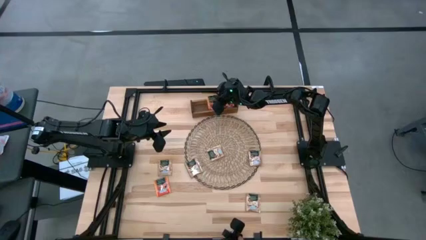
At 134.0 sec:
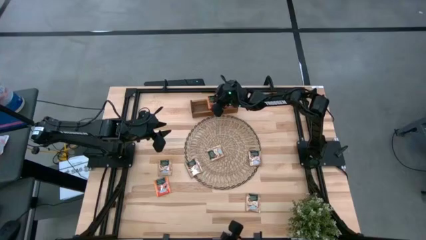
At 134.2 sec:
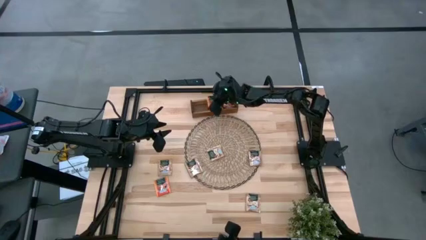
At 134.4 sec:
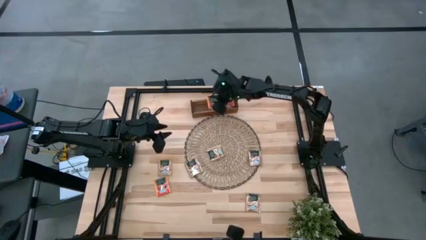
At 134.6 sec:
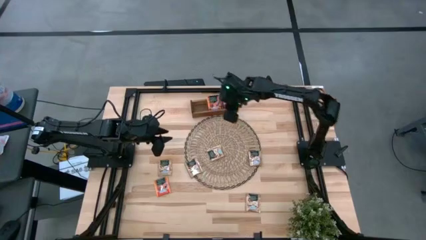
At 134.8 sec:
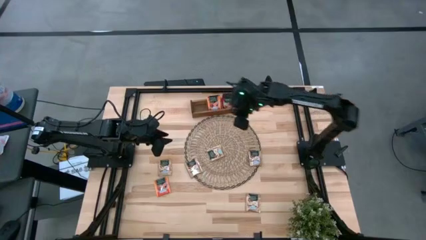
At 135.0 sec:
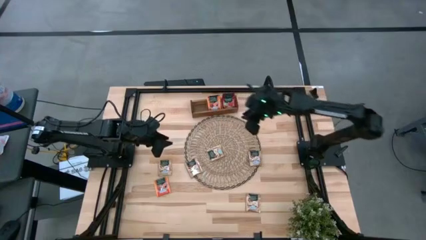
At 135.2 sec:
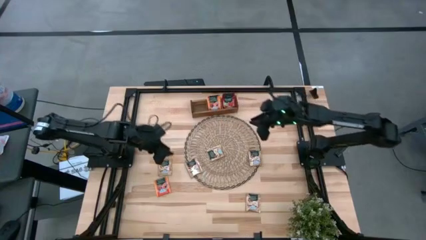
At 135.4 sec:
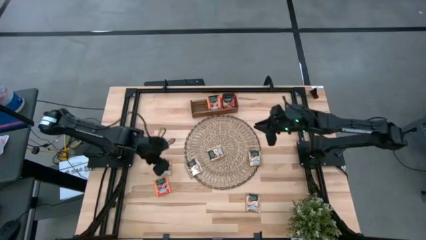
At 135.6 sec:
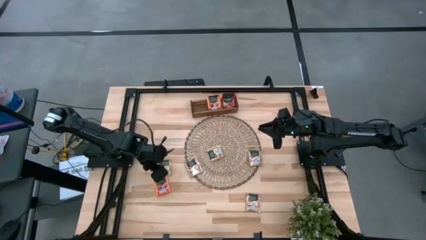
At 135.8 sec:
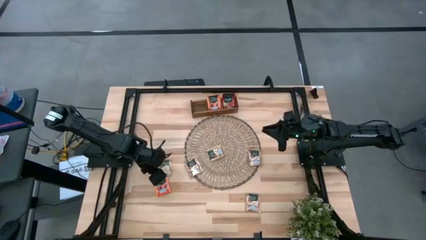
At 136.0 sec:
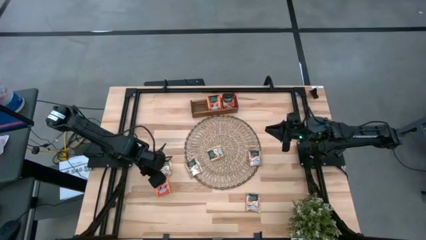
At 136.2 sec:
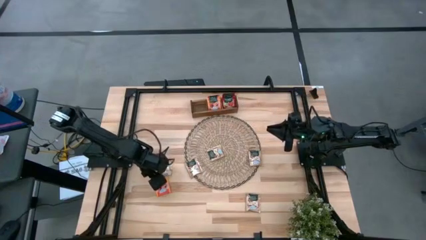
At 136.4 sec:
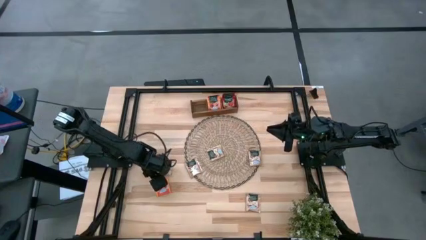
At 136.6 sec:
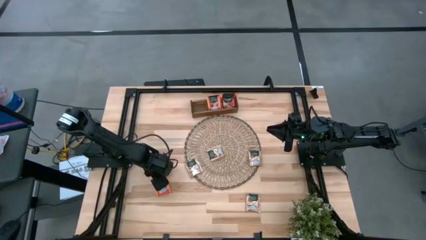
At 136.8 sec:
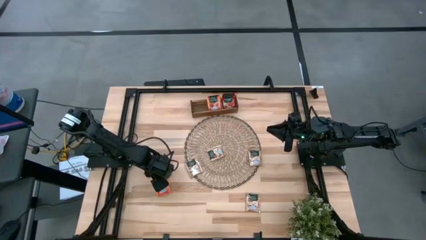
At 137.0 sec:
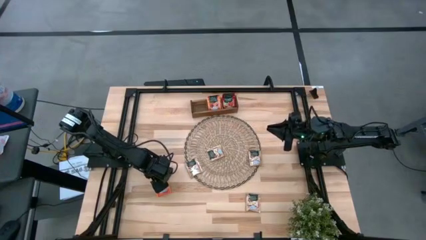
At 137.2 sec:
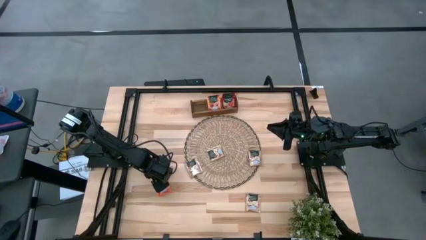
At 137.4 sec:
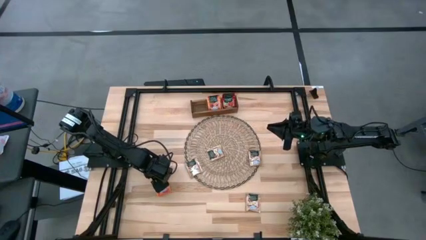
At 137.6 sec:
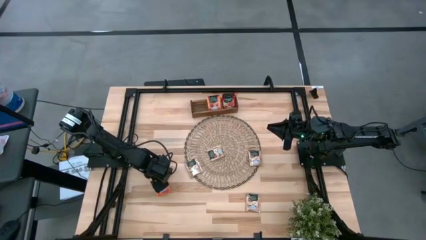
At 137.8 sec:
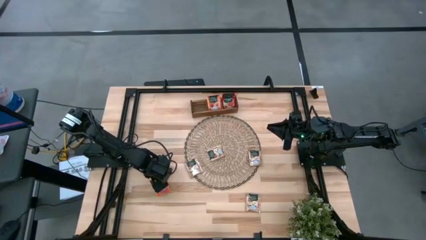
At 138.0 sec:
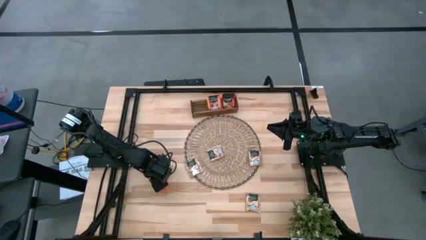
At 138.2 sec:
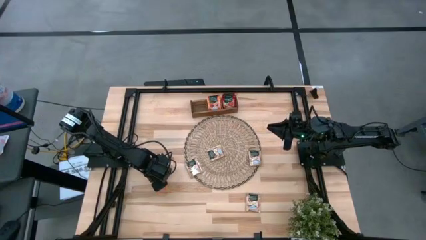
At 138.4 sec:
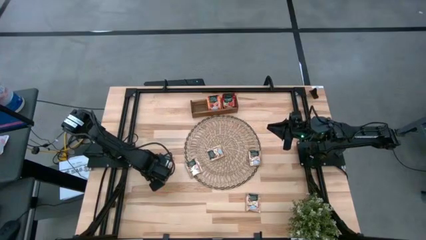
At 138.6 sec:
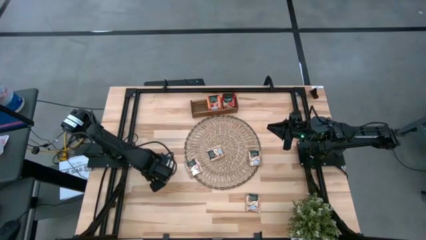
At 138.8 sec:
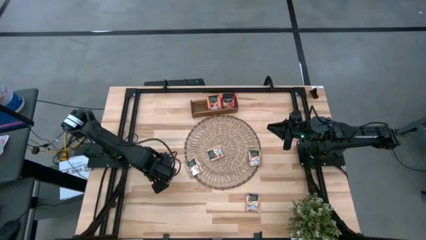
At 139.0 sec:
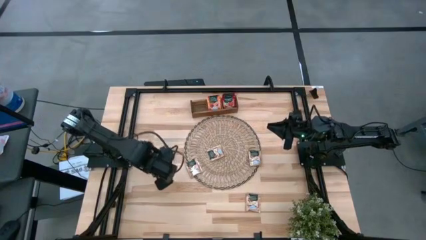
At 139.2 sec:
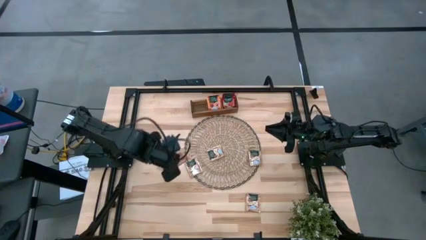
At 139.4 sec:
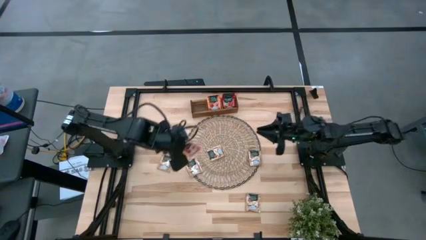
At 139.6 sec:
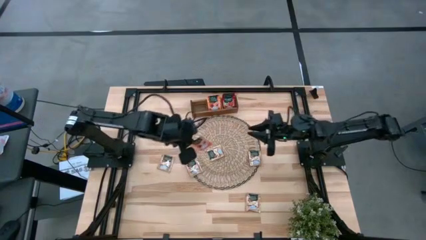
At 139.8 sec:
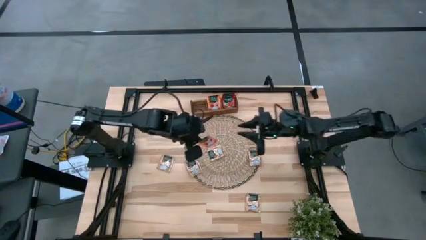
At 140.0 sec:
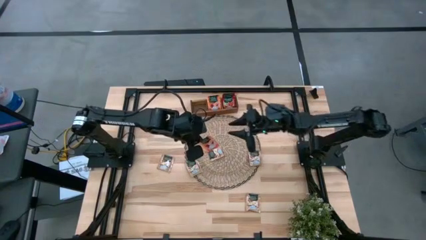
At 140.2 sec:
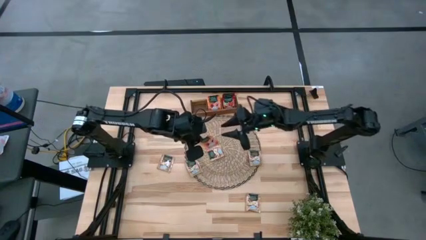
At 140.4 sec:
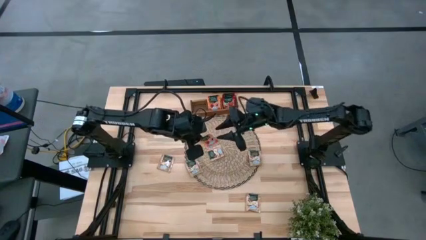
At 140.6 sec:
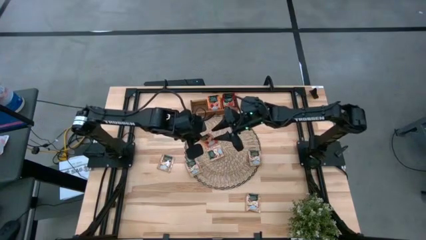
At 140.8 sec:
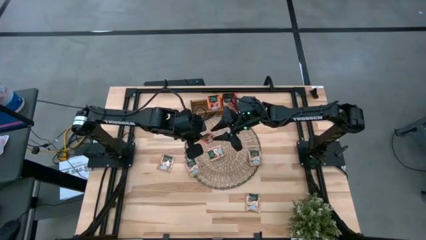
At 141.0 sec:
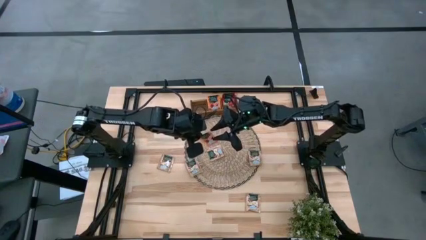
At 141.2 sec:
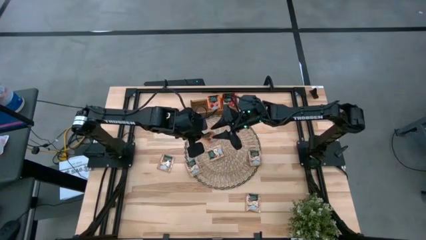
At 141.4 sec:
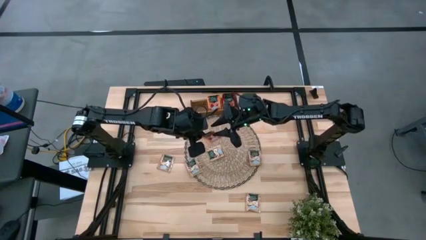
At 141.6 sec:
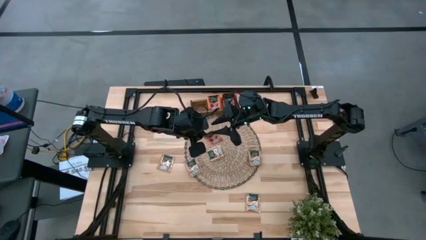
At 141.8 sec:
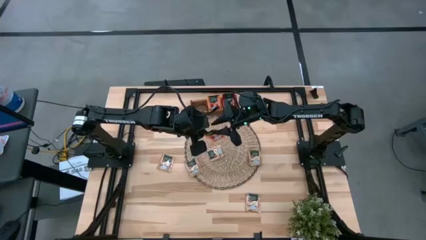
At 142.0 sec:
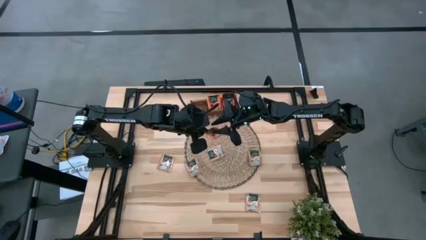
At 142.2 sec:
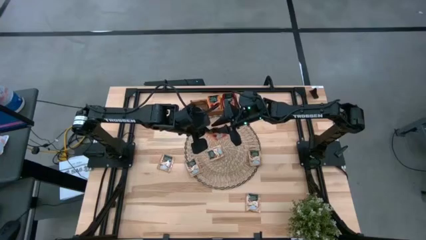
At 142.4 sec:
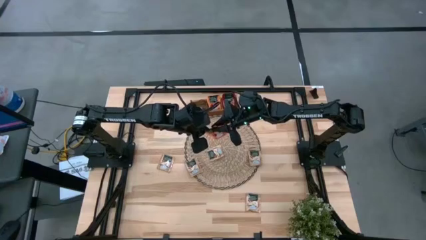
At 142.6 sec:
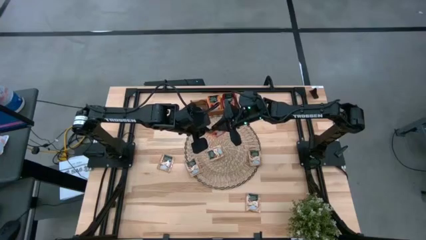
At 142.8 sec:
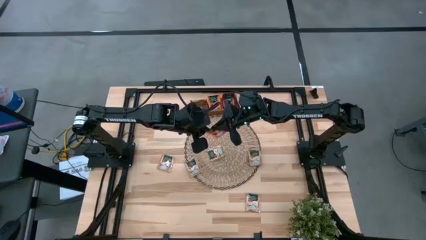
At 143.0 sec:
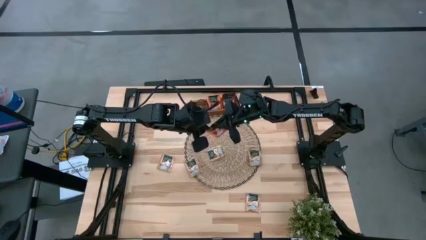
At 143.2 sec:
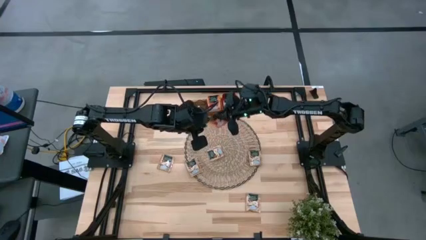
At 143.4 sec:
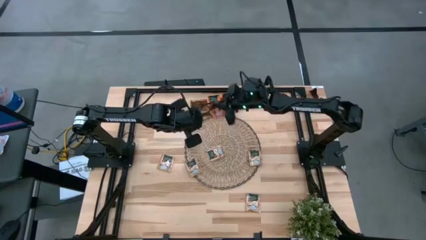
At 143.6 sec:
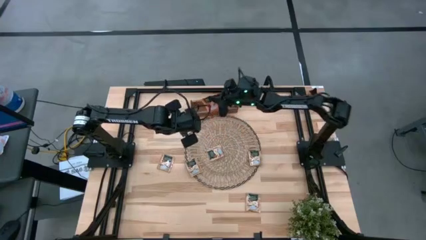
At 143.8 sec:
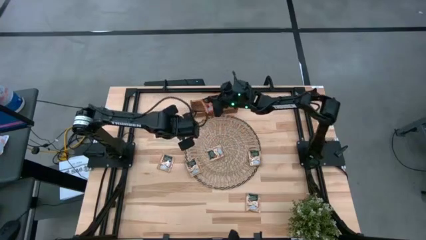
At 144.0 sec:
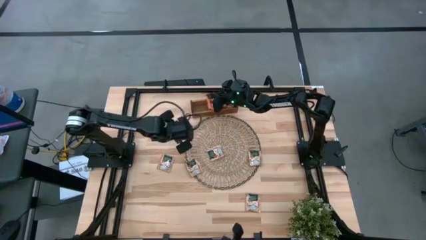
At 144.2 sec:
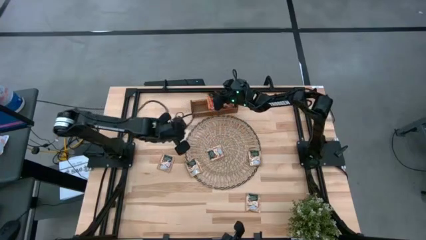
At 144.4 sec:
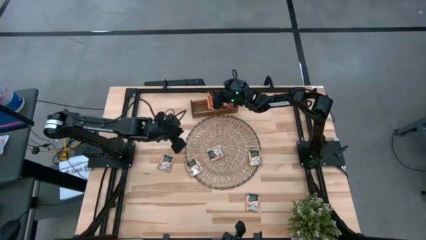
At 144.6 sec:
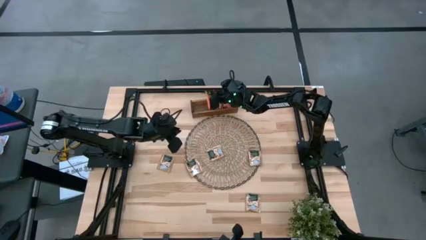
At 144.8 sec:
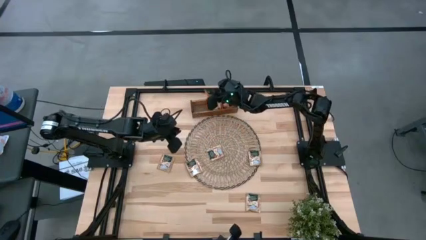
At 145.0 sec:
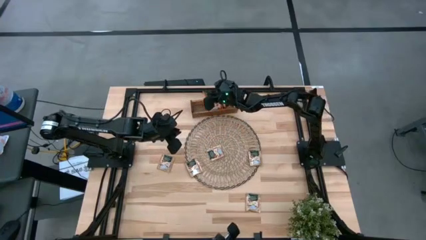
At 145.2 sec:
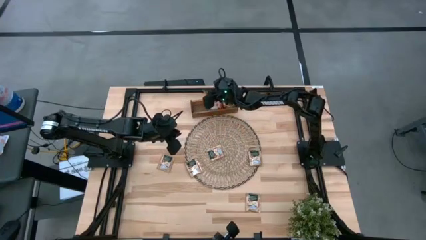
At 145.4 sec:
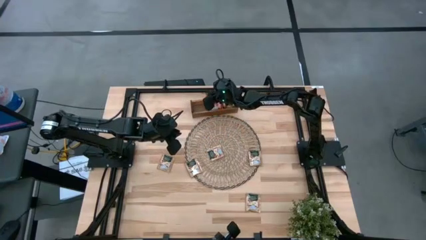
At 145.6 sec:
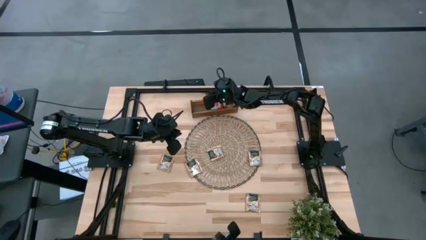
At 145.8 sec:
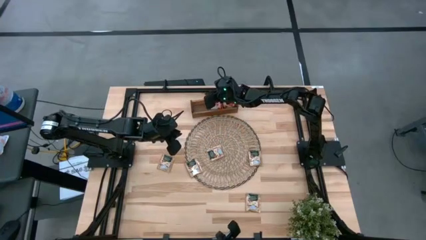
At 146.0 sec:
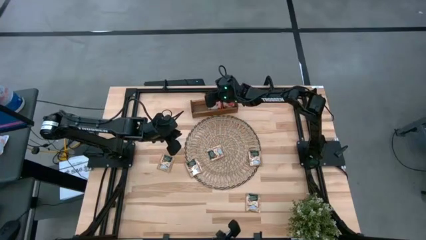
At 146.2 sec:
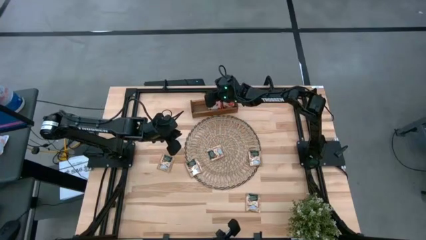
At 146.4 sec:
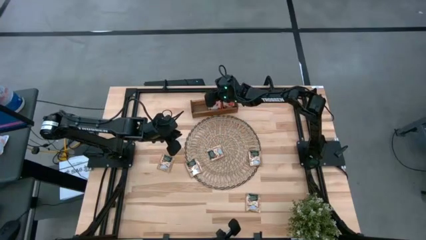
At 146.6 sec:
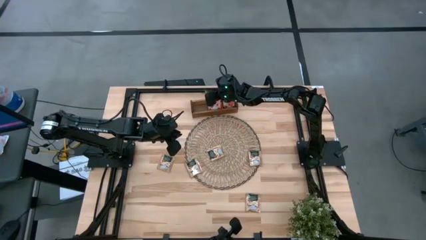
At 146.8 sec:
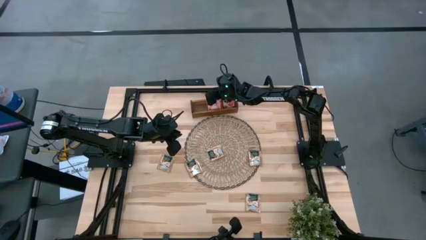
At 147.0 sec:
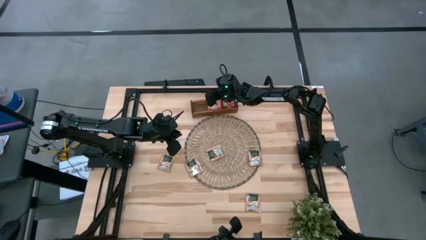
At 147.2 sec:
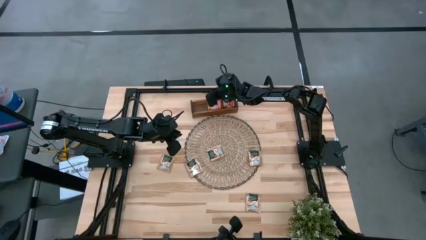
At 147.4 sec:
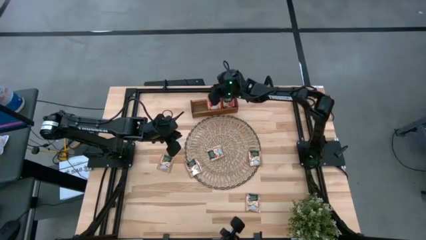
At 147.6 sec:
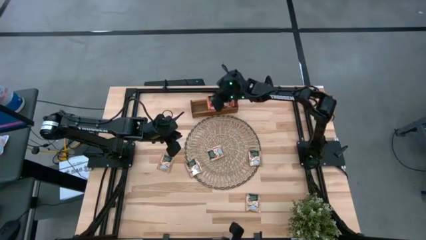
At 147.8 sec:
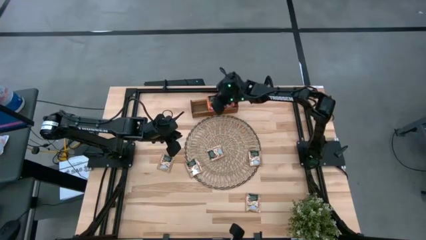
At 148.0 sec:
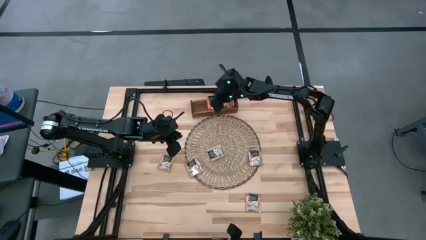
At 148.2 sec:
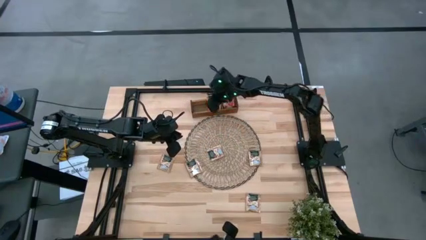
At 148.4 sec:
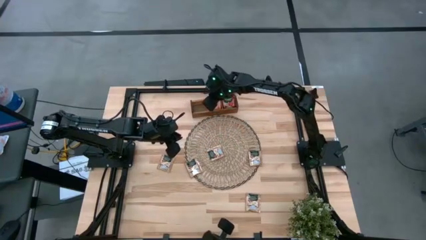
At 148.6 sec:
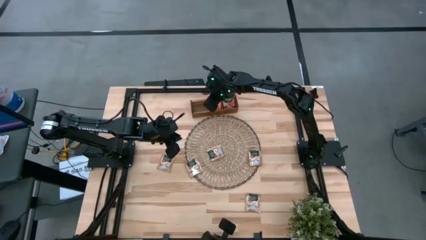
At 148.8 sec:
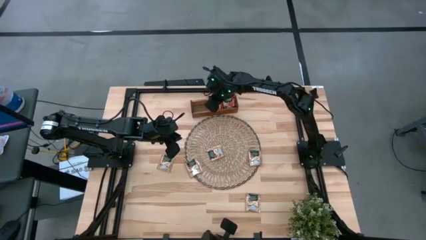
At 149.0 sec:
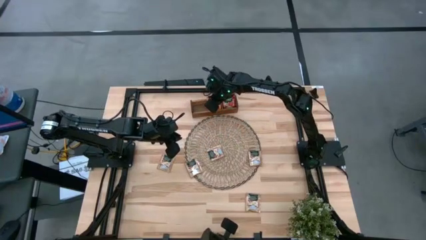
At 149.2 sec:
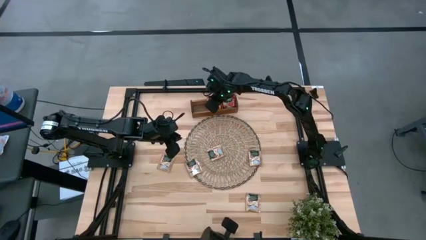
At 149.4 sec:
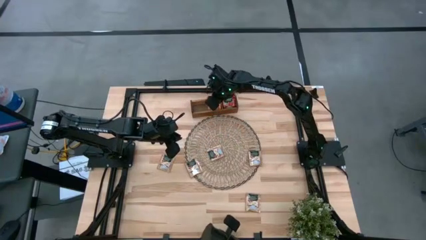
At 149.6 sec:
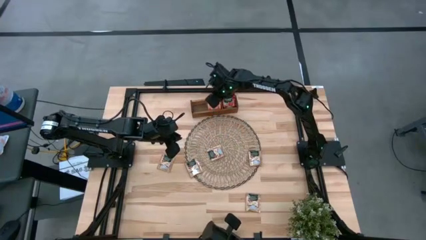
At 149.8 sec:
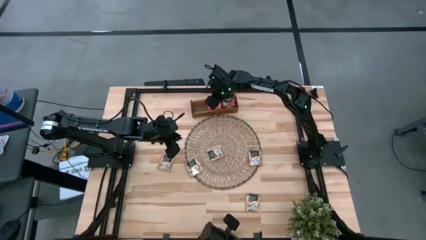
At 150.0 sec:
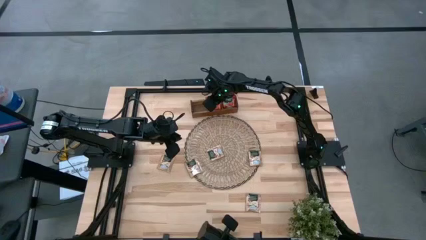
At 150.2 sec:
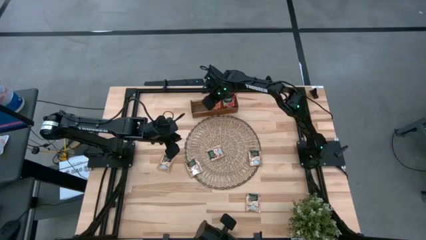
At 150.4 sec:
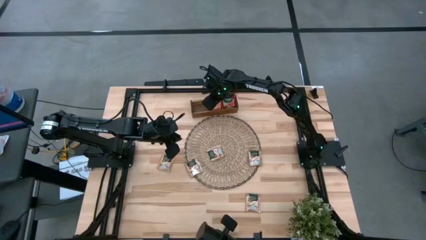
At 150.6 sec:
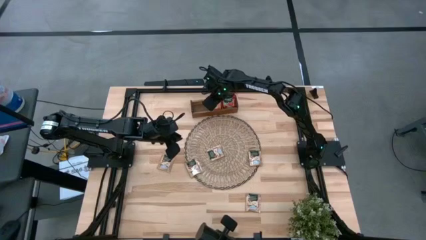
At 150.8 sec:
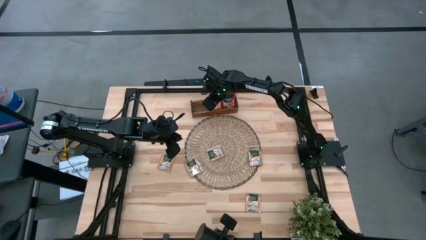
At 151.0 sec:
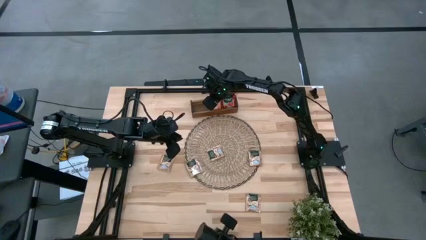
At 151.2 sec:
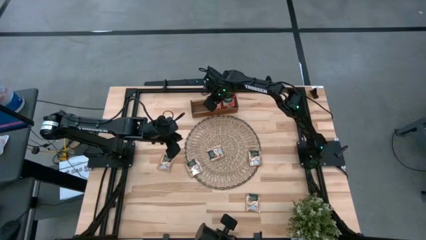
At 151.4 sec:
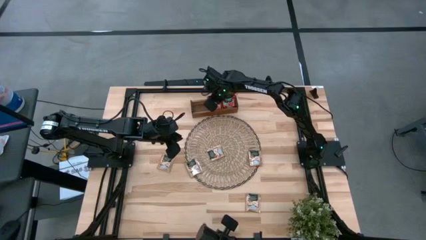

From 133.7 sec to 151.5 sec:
Task: Pick & Place Tea
Put the orange tea bag into the middle section of the wooden organizer
